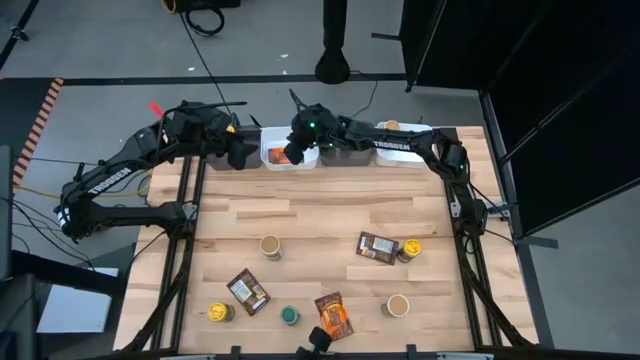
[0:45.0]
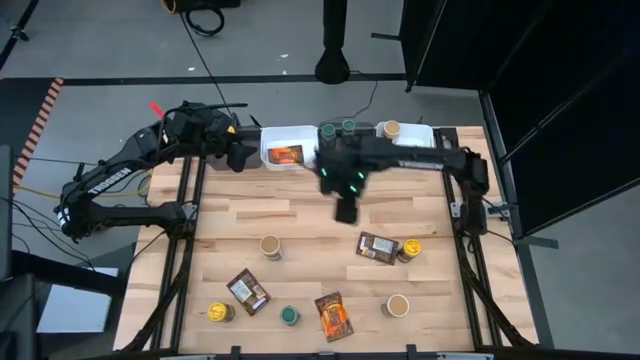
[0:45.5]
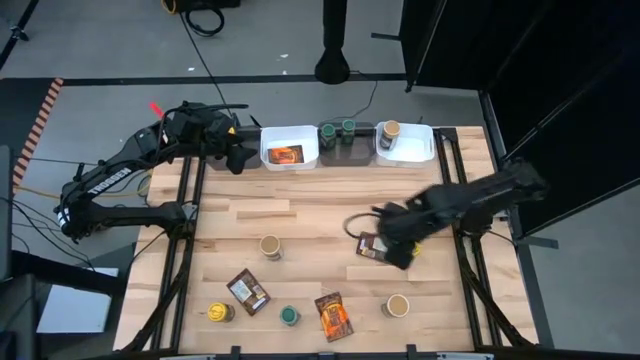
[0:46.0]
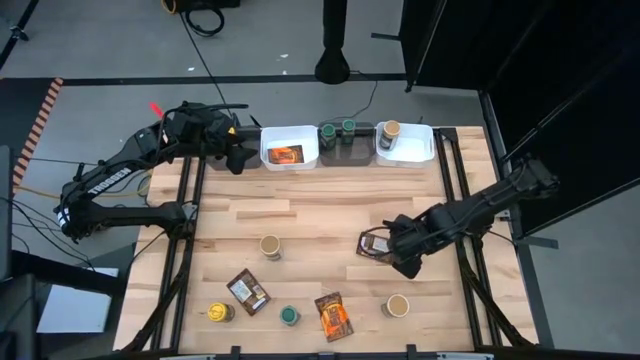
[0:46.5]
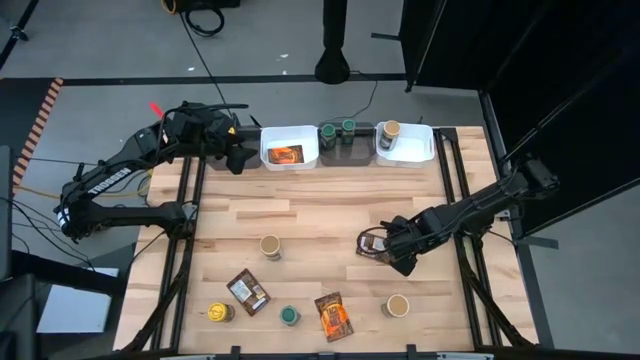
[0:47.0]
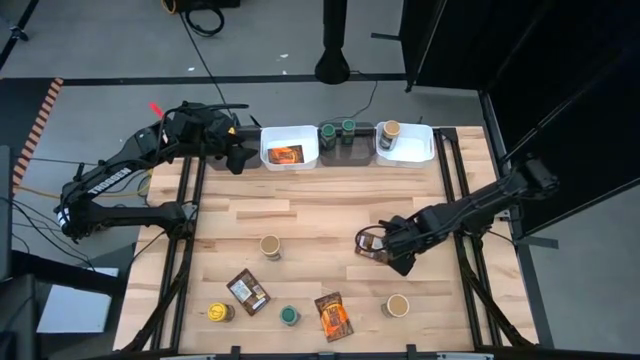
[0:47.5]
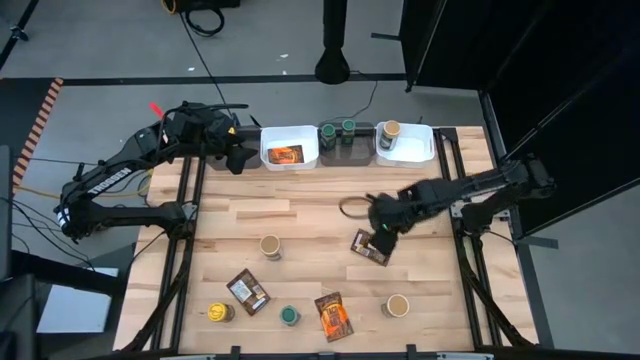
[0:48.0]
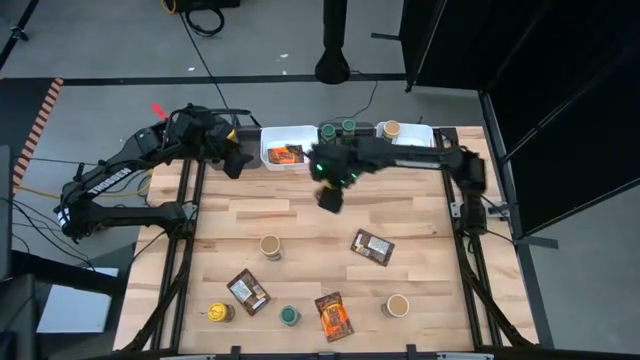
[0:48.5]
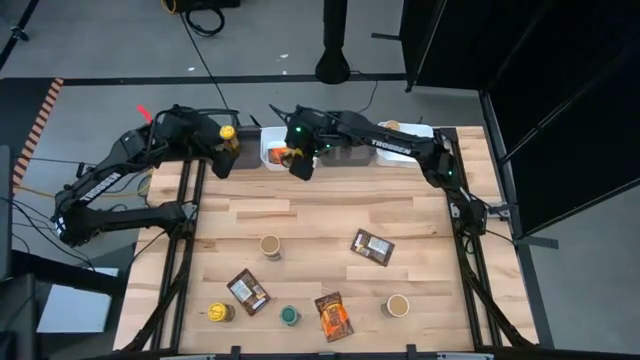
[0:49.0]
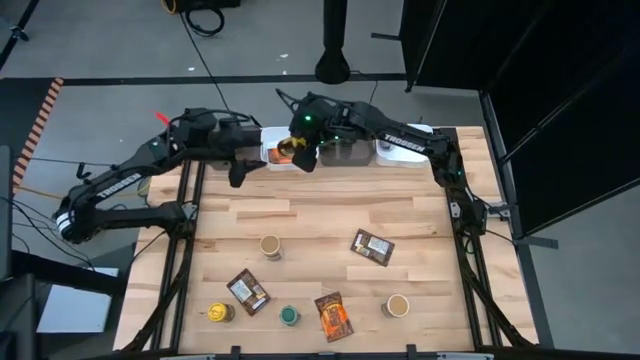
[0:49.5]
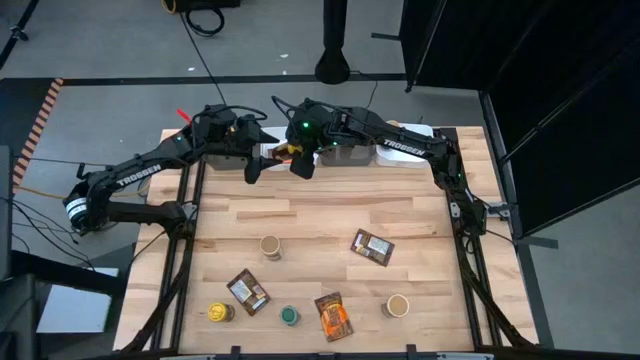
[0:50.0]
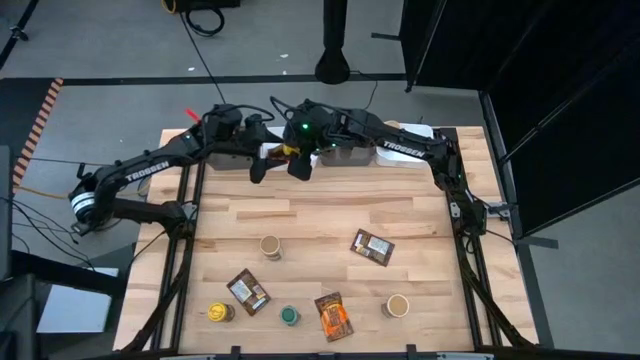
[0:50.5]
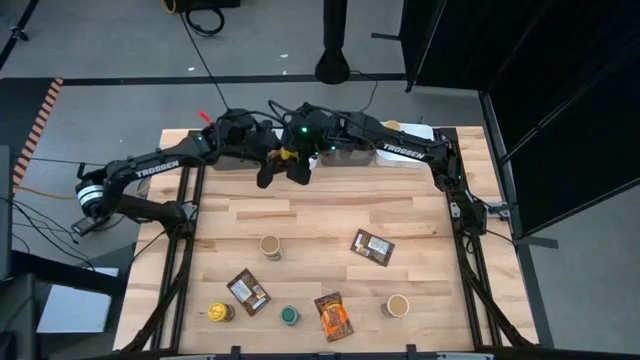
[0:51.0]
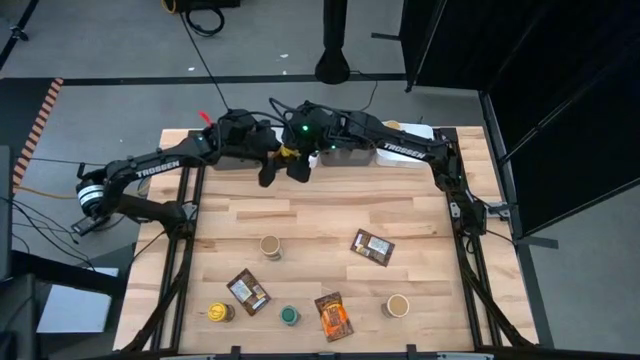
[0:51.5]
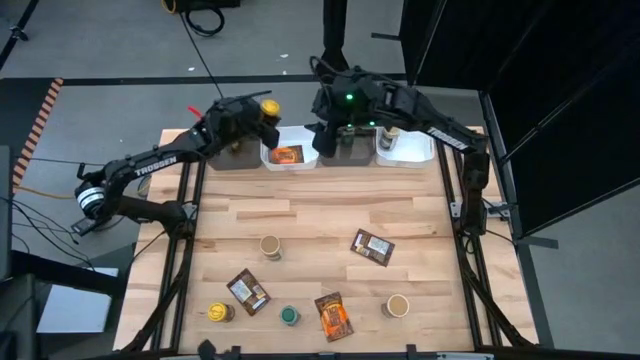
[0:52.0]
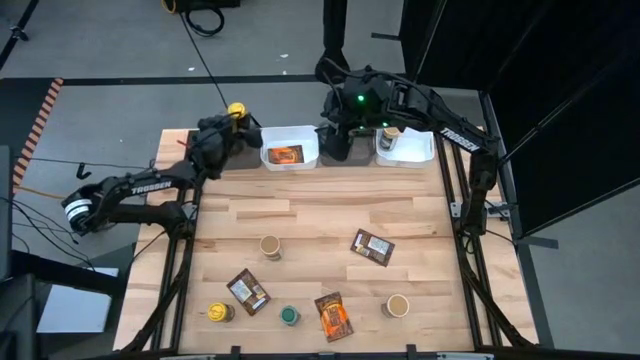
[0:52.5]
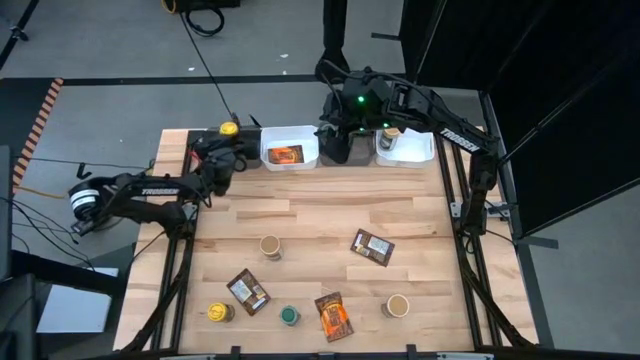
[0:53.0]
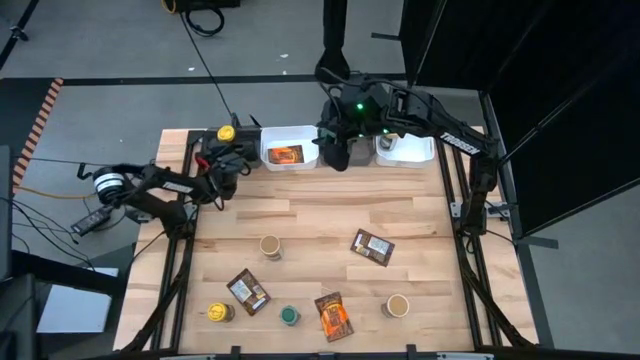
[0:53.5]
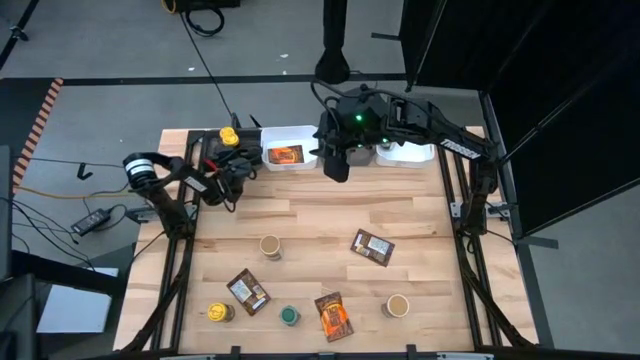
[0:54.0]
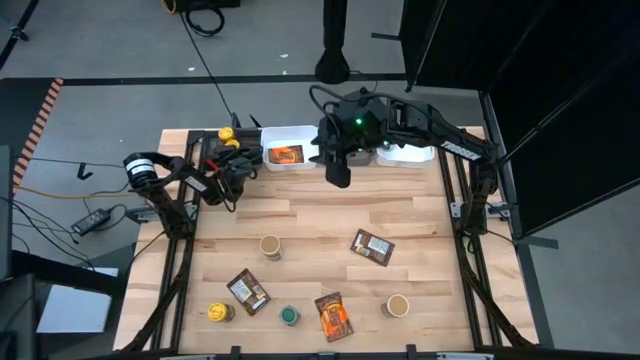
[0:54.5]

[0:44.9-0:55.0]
Task: Sort spices by type
Put the right yellow seasoning bottle into the left black bin

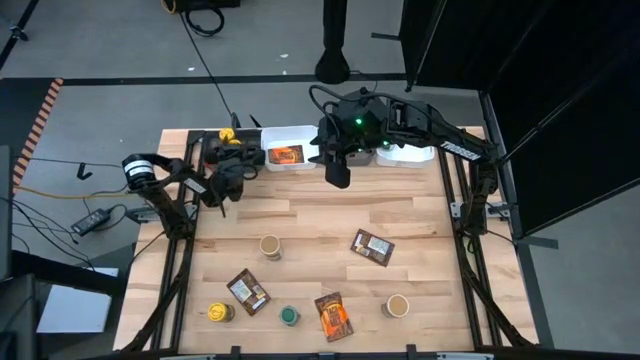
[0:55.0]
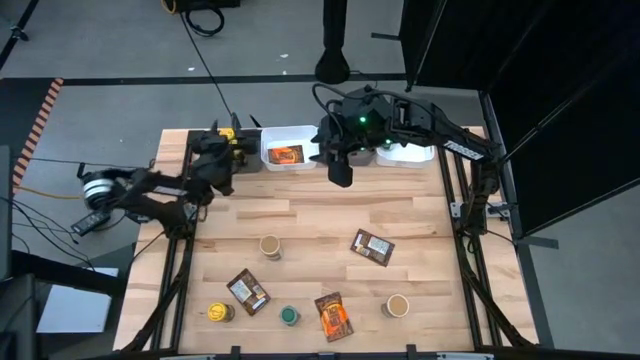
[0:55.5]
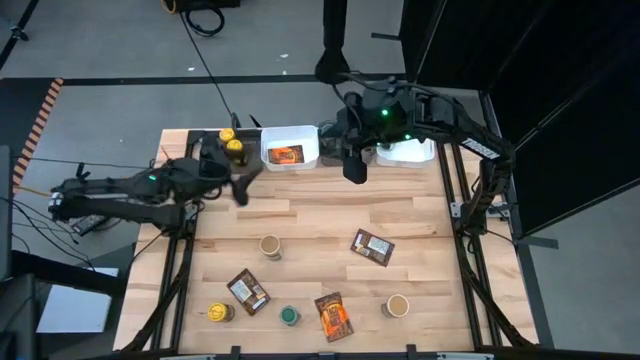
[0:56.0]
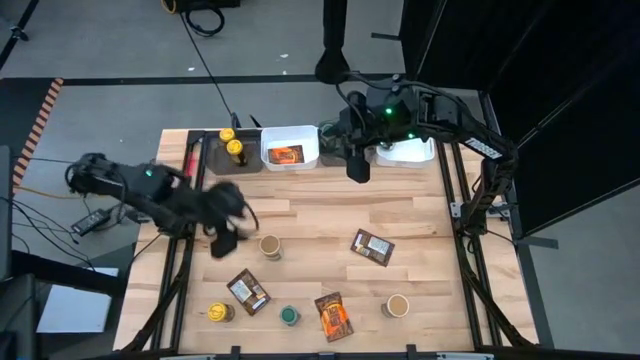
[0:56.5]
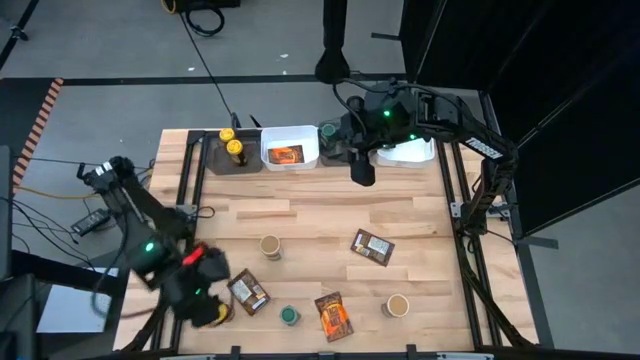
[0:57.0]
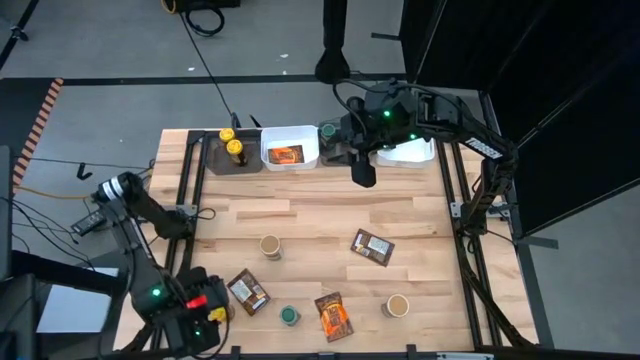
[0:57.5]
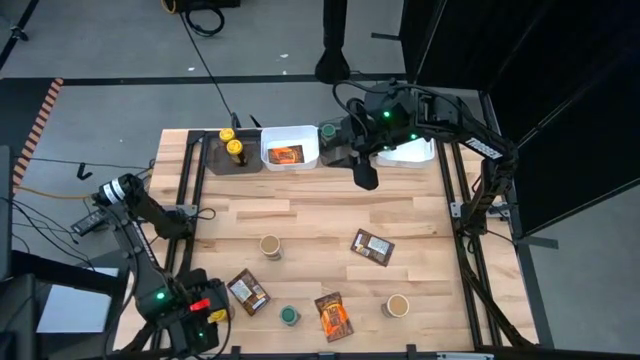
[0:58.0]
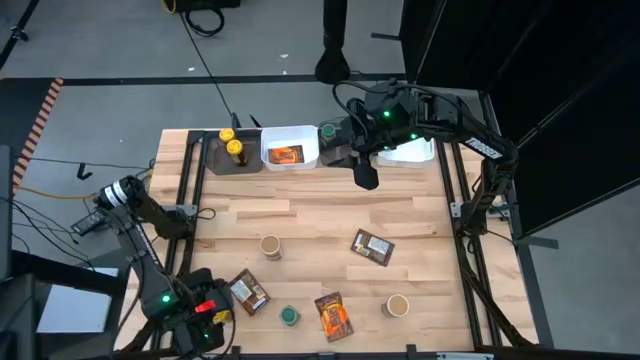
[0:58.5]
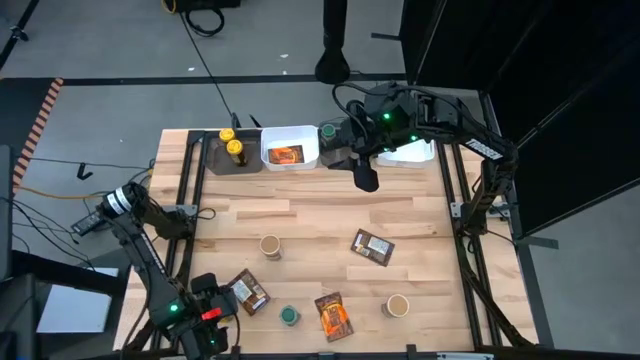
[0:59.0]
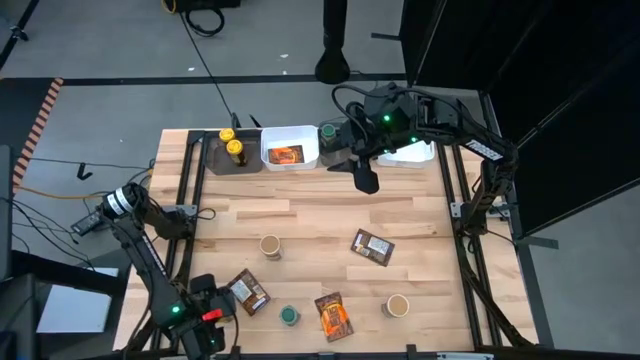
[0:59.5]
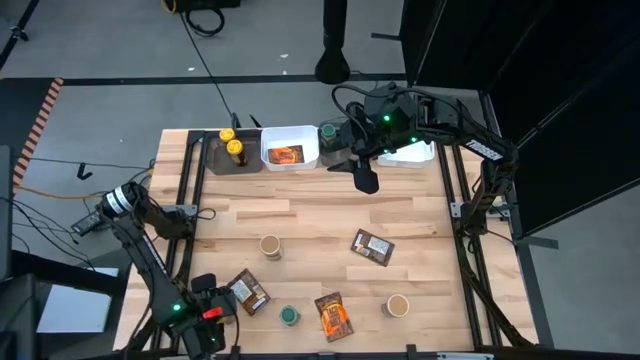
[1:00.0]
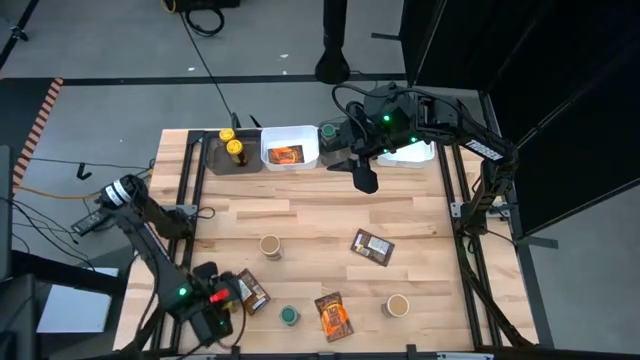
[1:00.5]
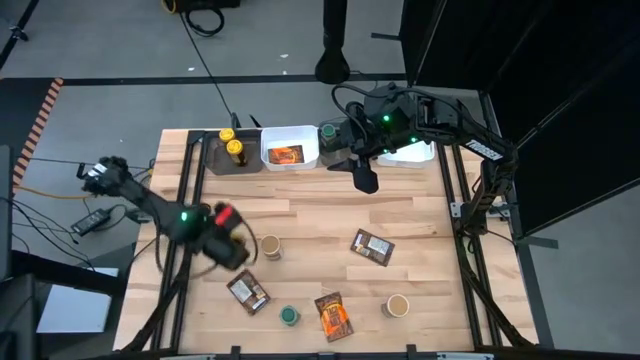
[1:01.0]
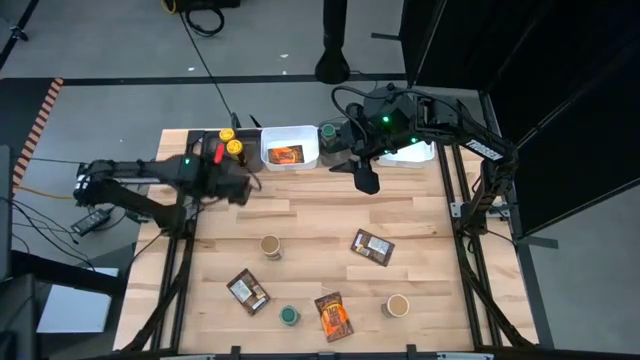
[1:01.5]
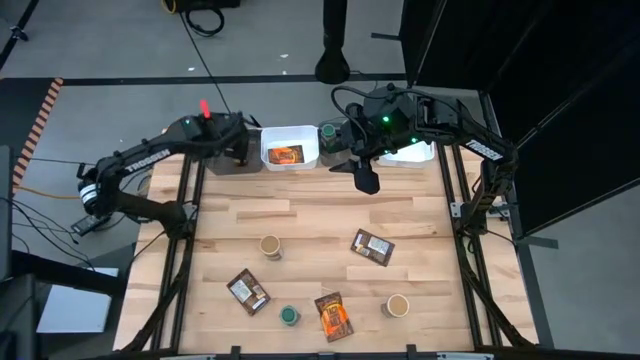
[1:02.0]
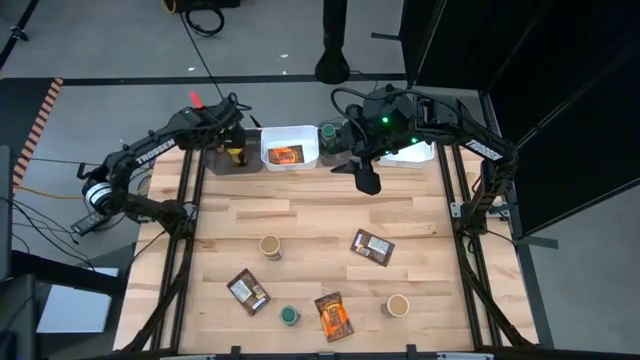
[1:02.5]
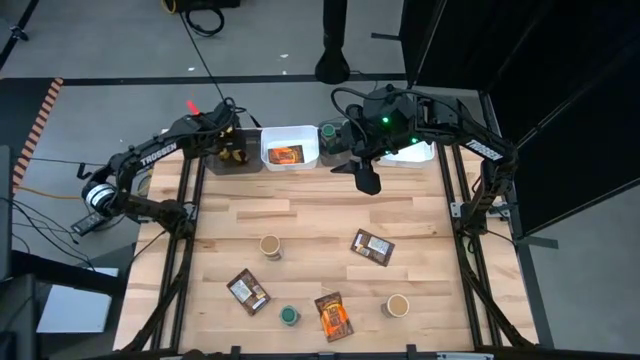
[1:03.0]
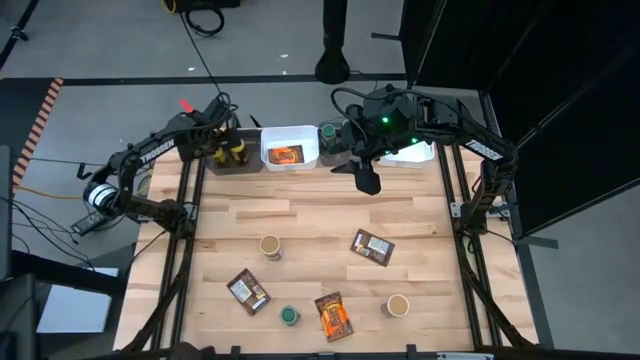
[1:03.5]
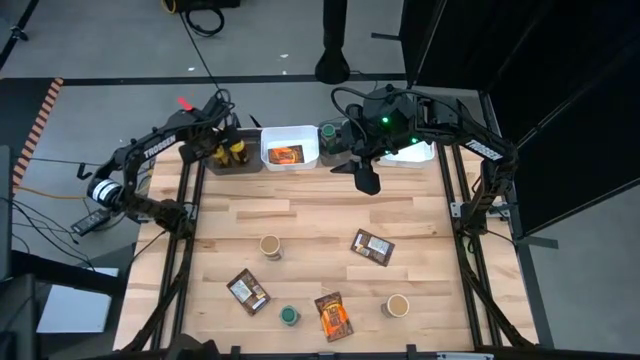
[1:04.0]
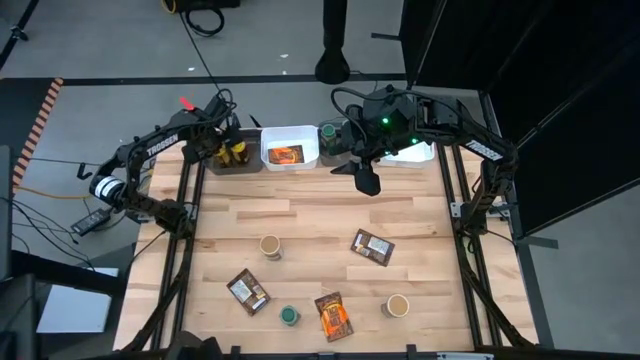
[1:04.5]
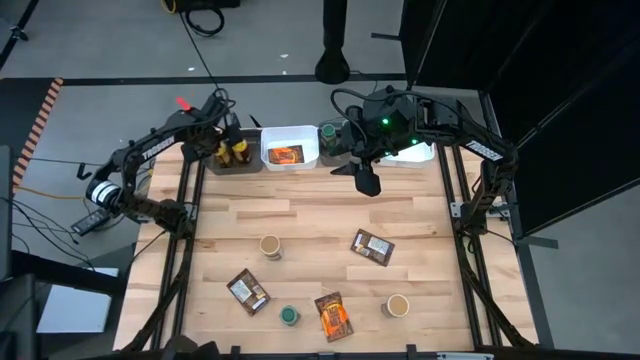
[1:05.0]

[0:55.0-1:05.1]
Put the yellow seasoning bottle into the left black bin

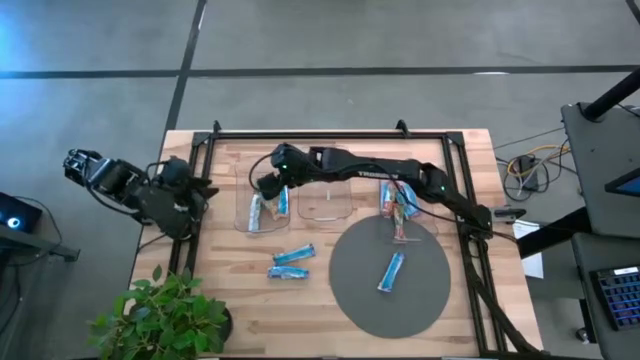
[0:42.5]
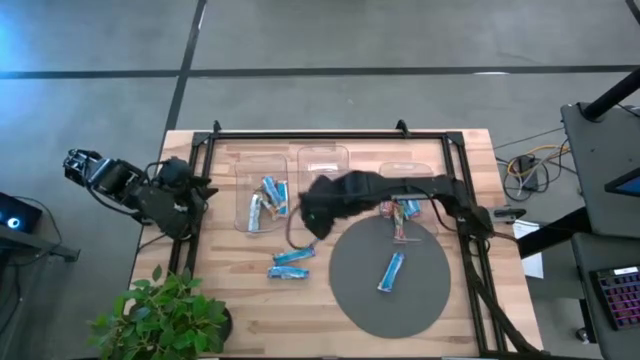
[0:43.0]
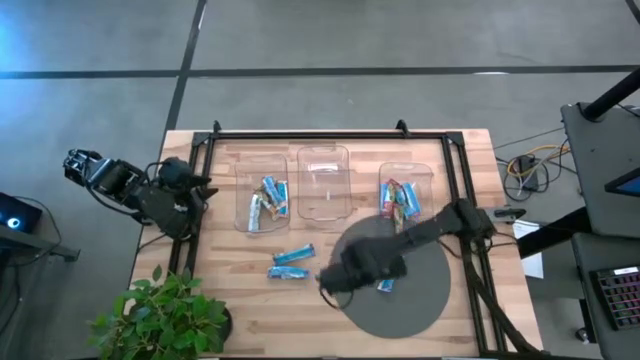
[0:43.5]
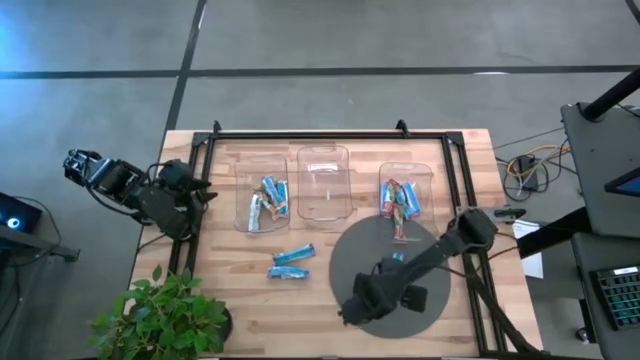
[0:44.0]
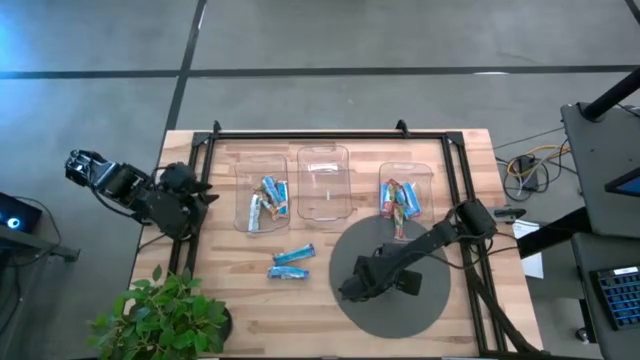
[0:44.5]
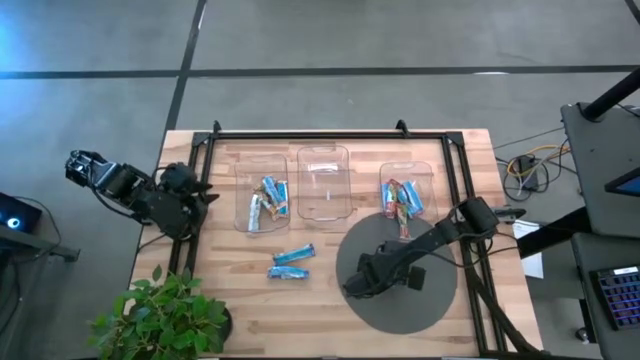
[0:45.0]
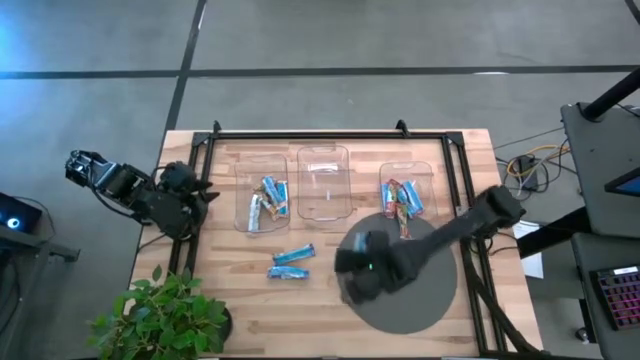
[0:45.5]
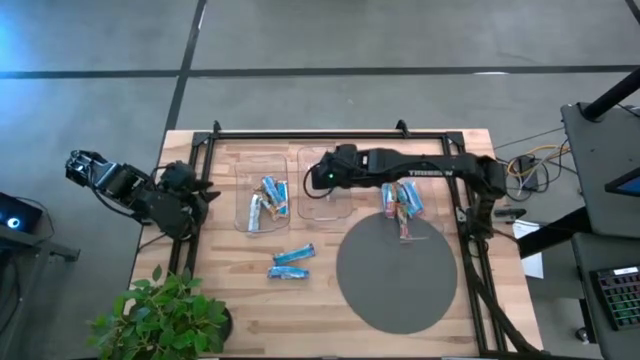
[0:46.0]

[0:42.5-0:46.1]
Task: Pick and place Granola Bars by type
Put the blue granola bar into the middle transparent bin
